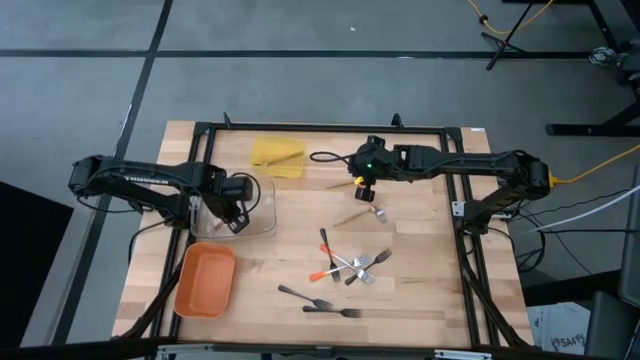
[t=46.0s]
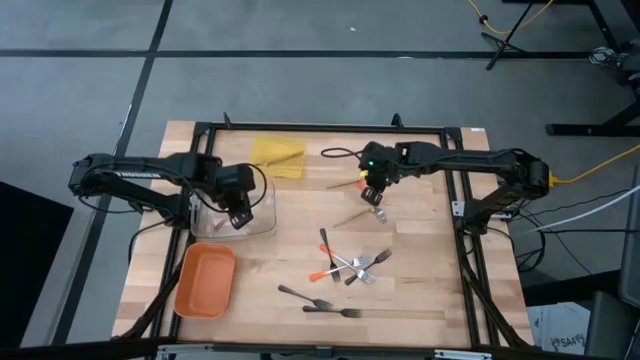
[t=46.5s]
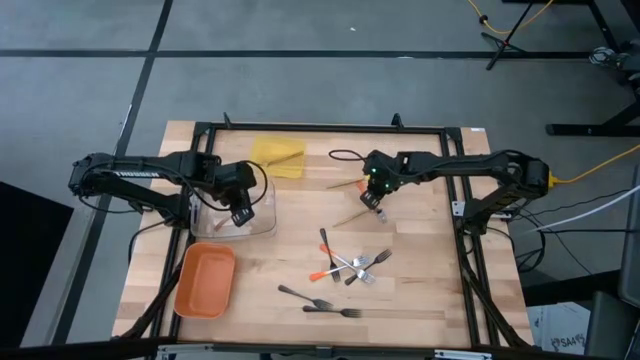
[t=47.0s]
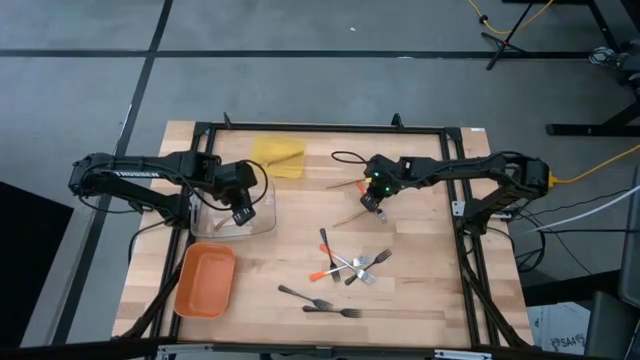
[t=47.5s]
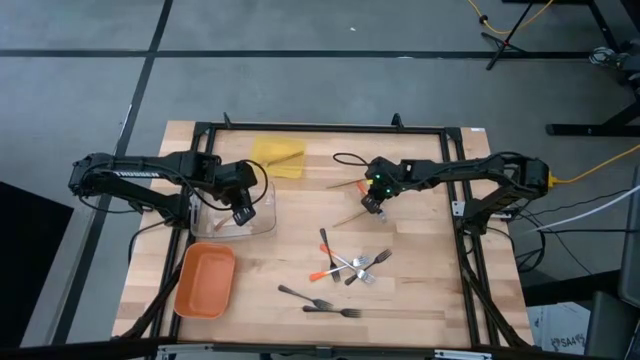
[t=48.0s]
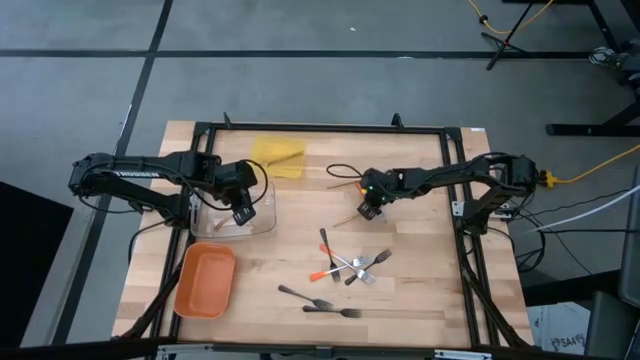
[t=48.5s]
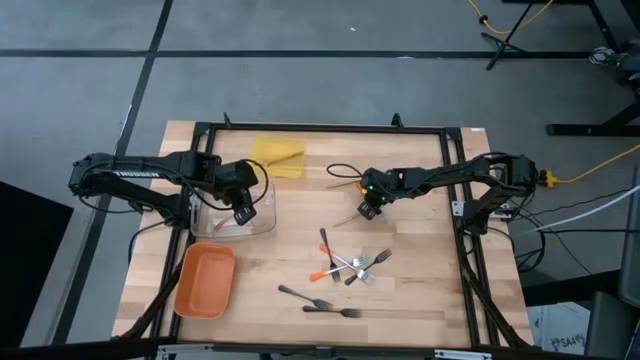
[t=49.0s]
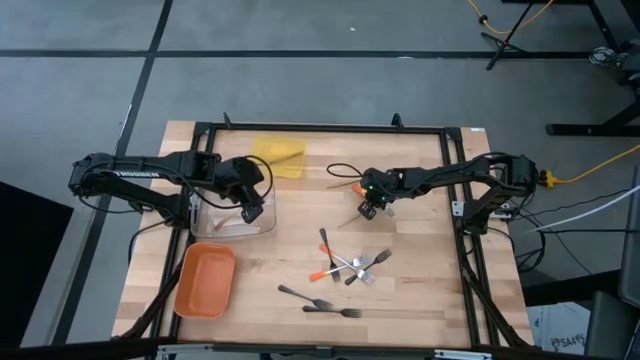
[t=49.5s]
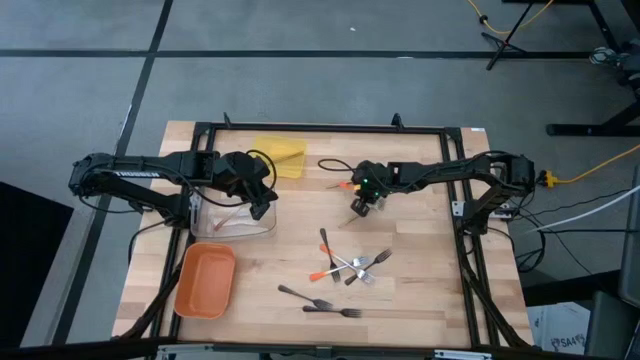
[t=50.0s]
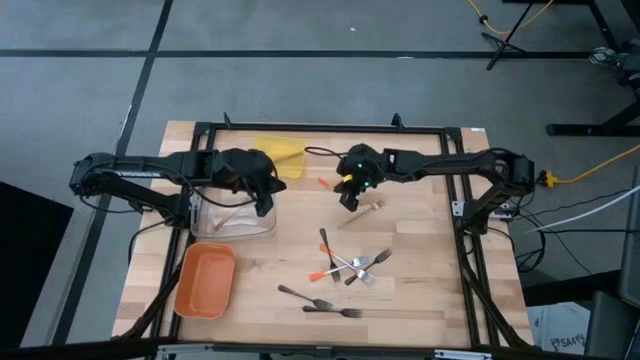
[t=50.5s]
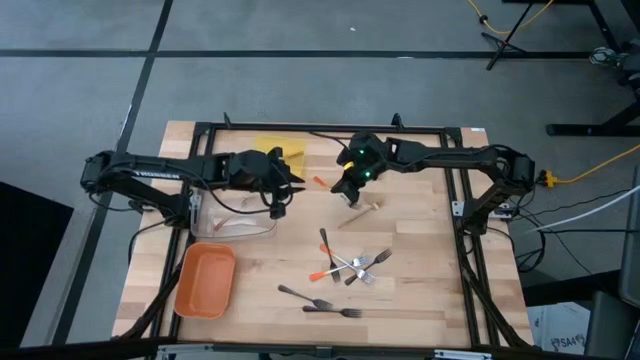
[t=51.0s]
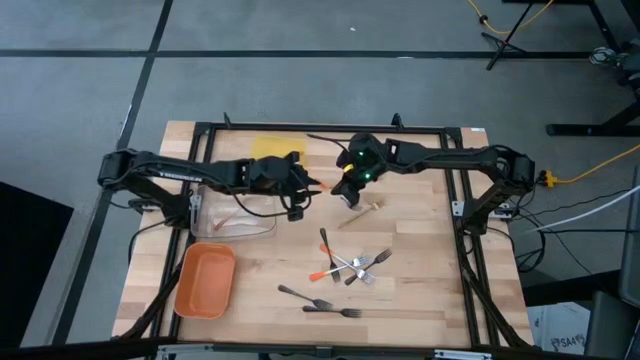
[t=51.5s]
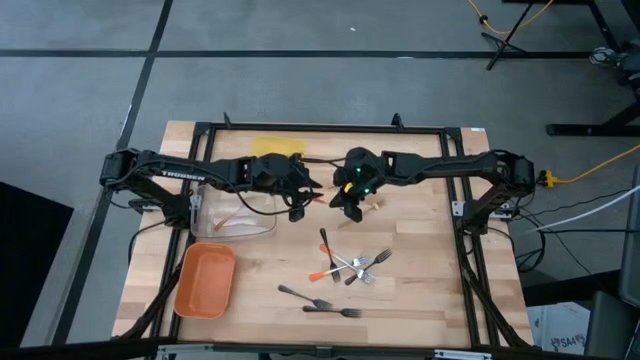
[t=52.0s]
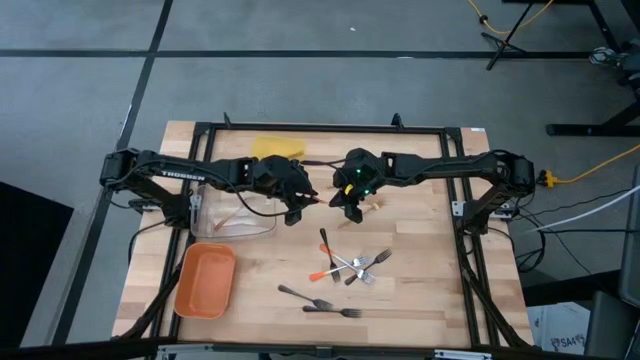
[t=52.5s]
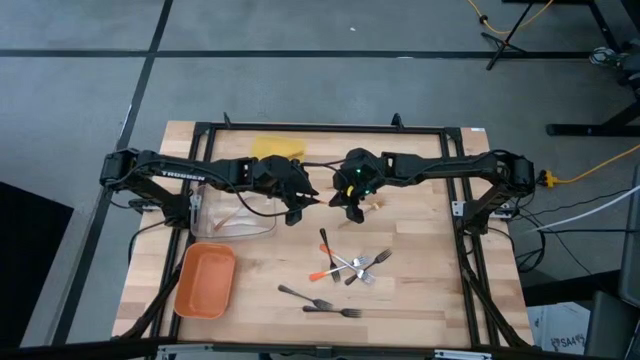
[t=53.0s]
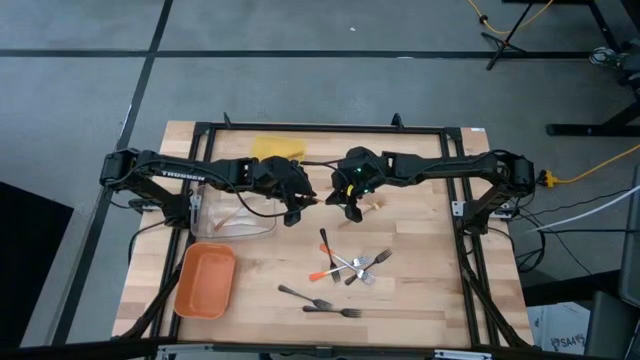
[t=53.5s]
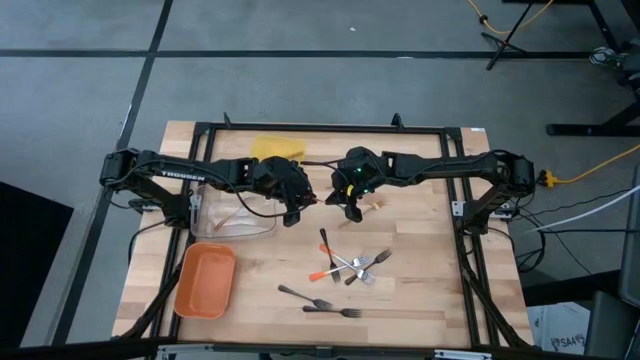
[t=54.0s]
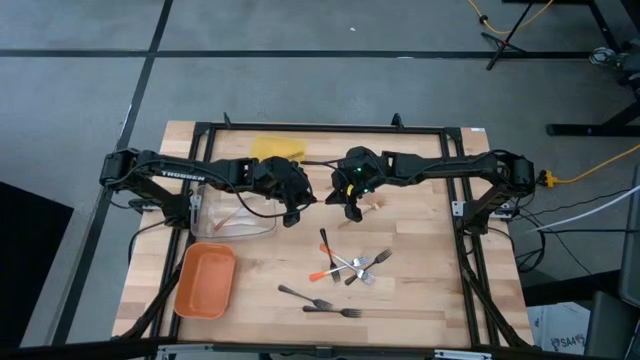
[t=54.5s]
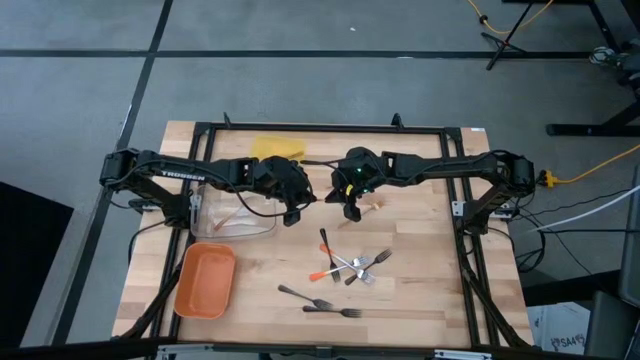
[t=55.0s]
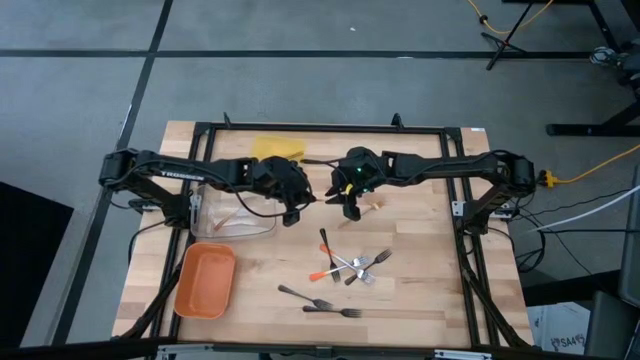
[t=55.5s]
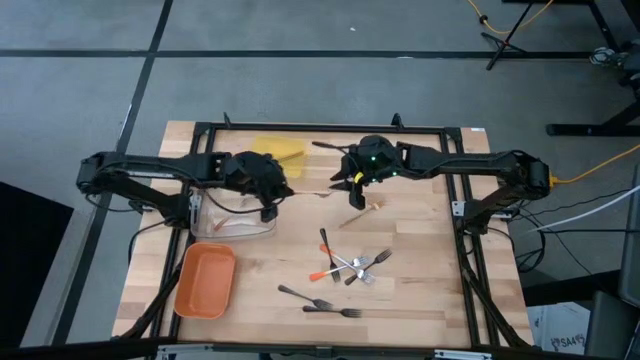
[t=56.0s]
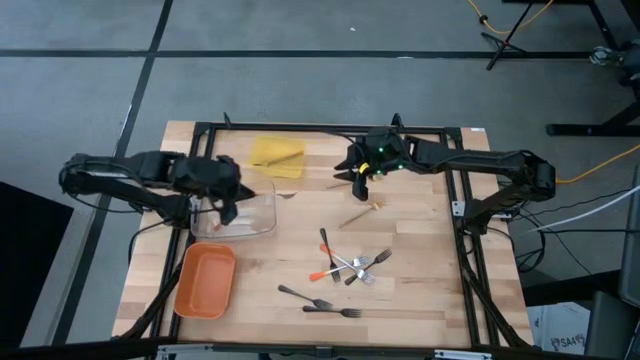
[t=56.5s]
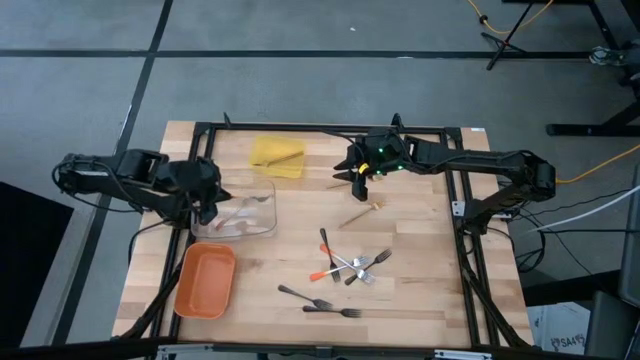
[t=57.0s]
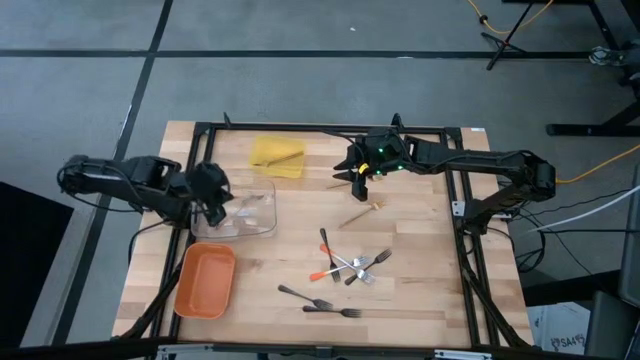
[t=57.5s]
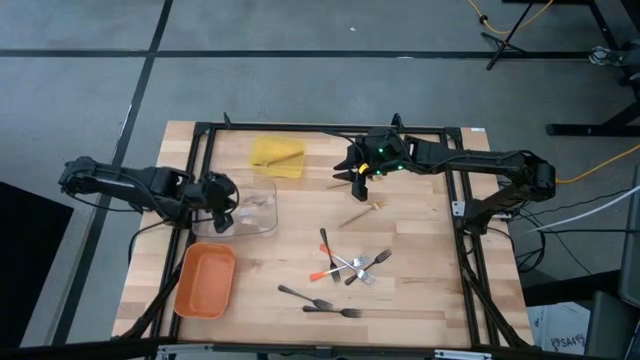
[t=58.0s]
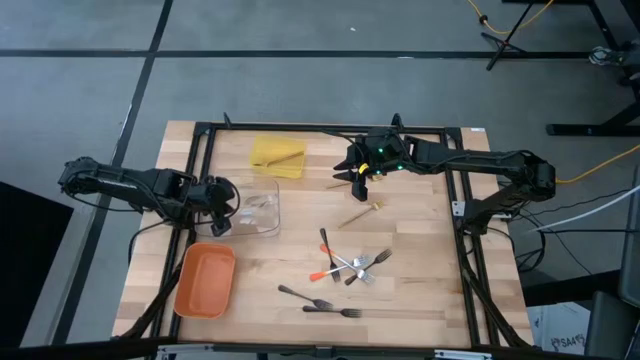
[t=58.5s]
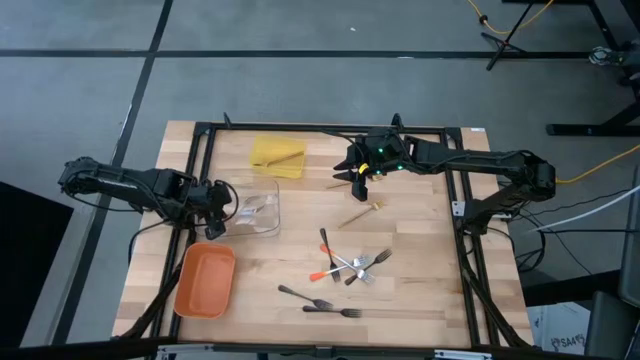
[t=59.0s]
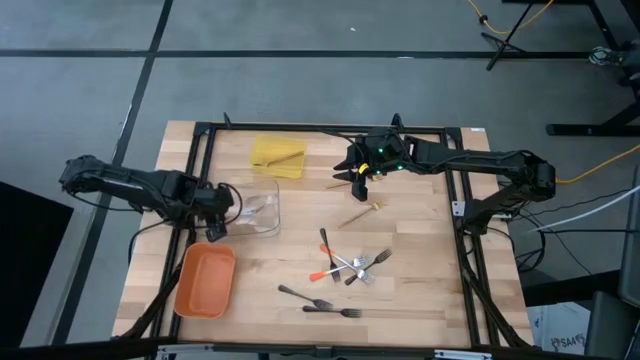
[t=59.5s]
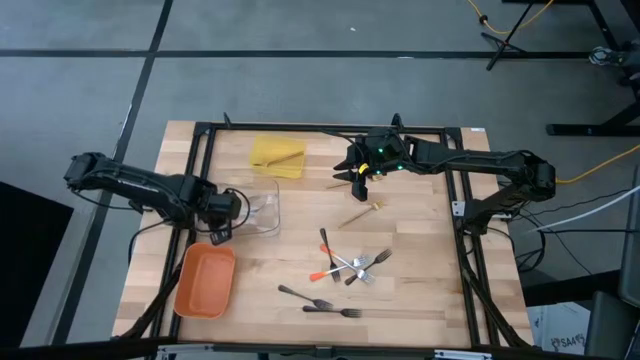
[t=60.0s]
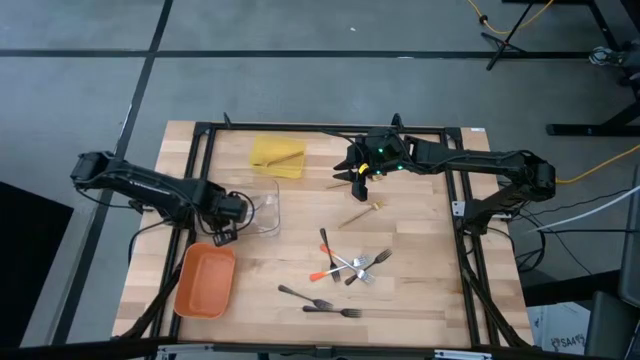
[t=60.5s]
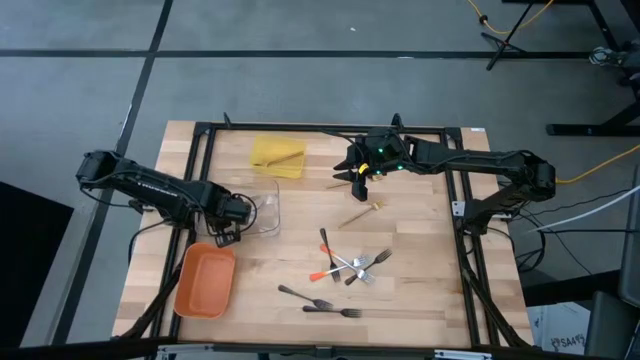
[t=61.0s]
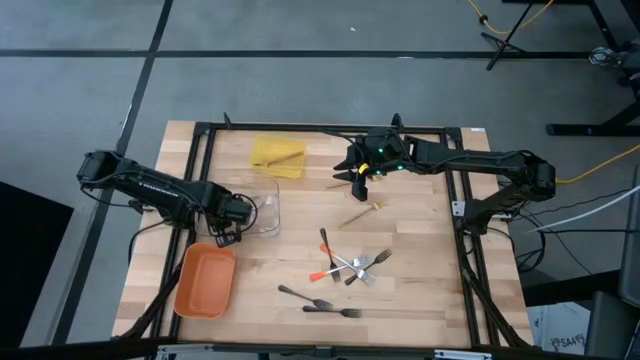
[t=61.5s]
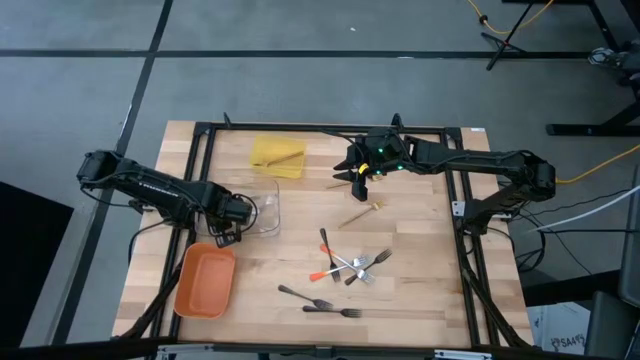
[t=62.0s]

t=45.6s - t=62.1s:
Task: Sort silverware by color (type)
Put the orange fork into the transparent bin

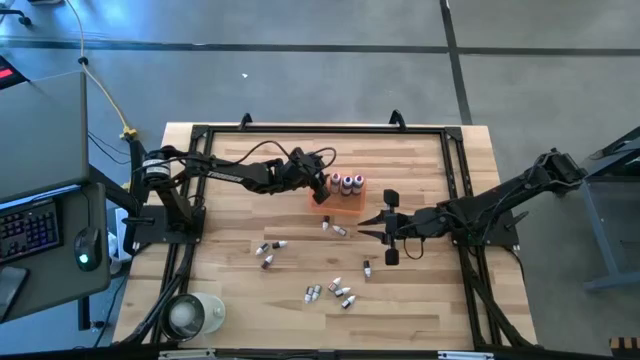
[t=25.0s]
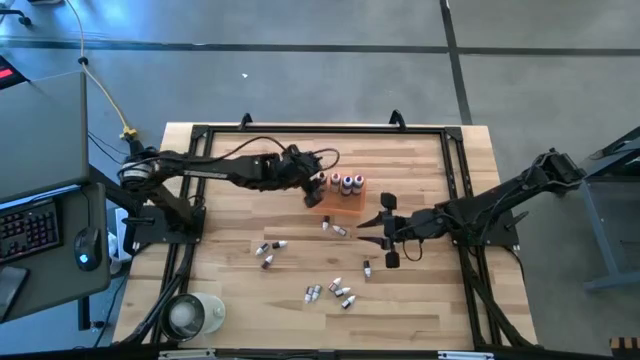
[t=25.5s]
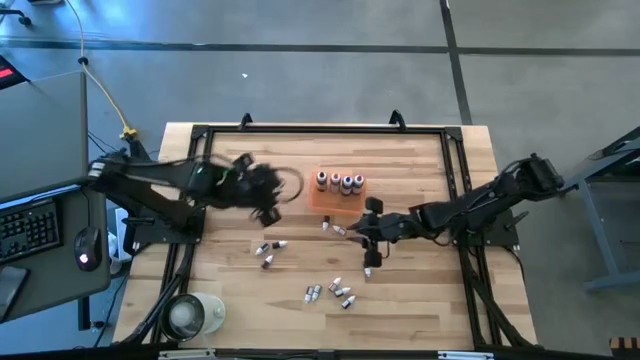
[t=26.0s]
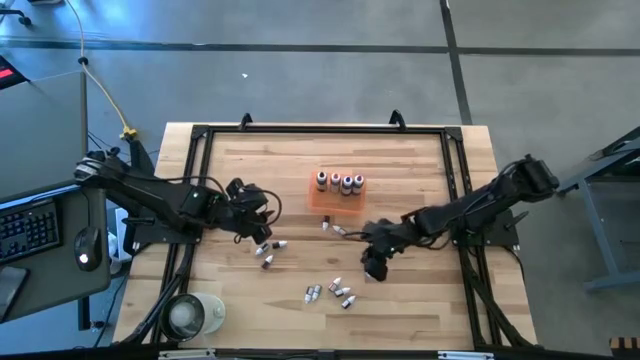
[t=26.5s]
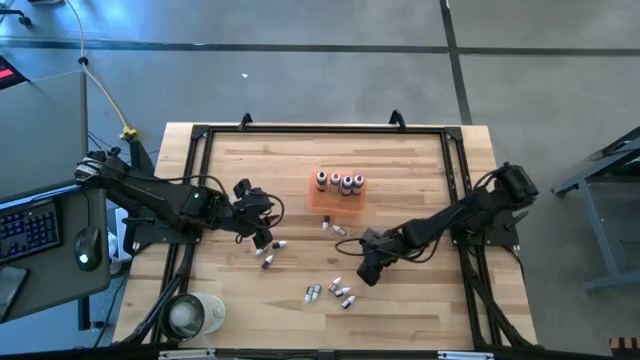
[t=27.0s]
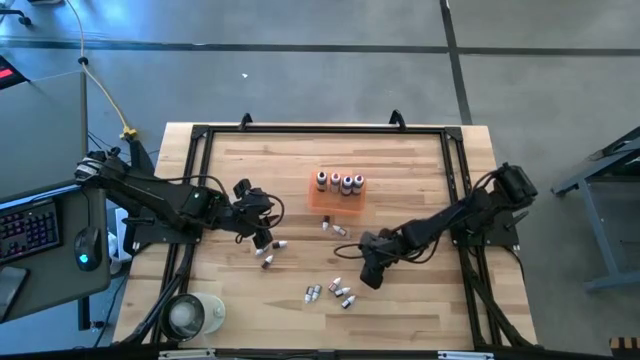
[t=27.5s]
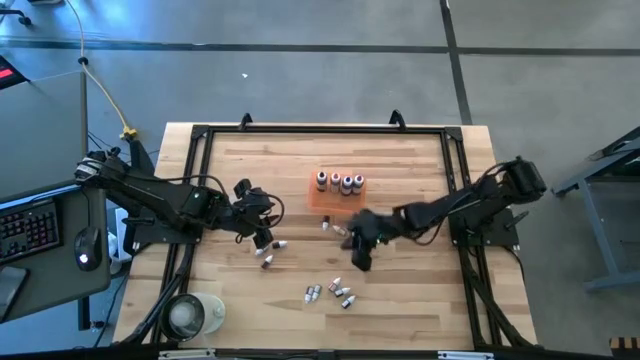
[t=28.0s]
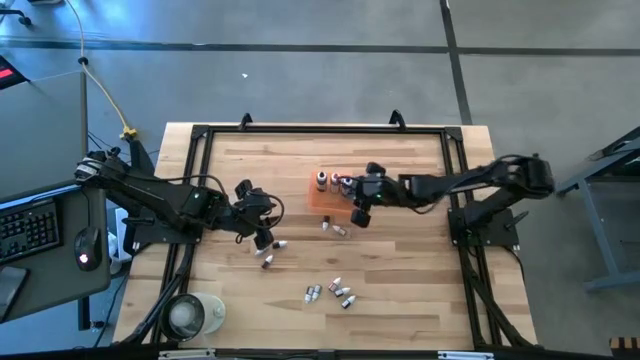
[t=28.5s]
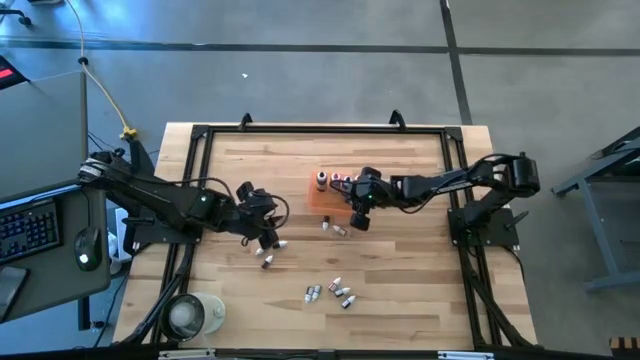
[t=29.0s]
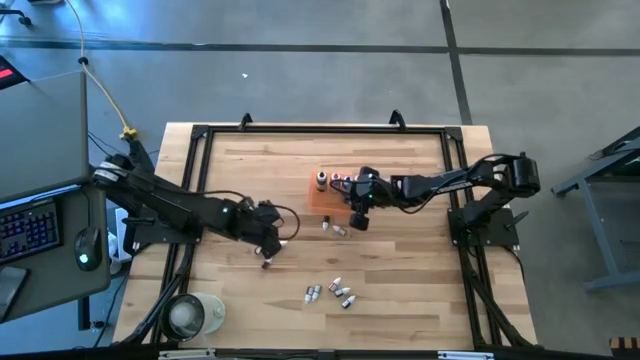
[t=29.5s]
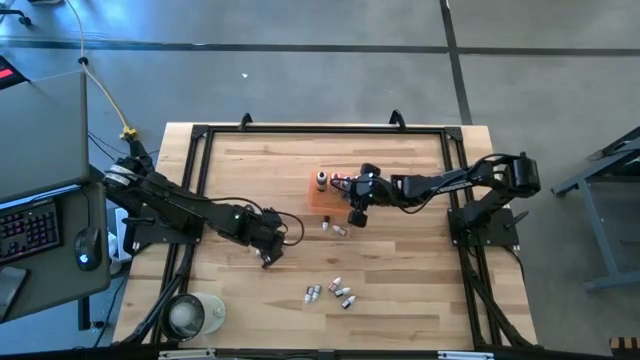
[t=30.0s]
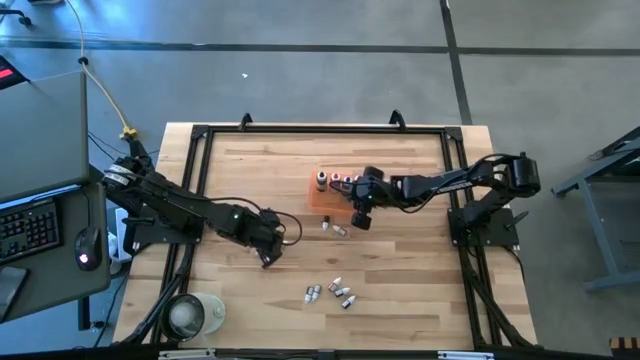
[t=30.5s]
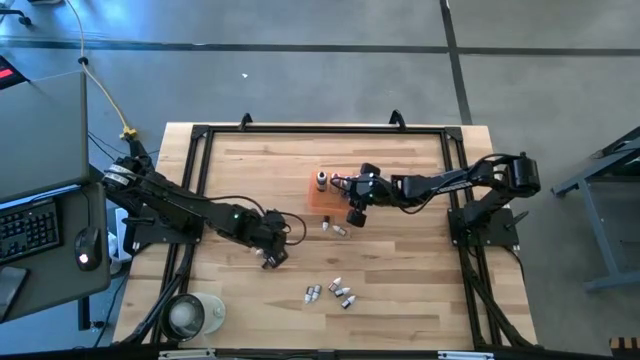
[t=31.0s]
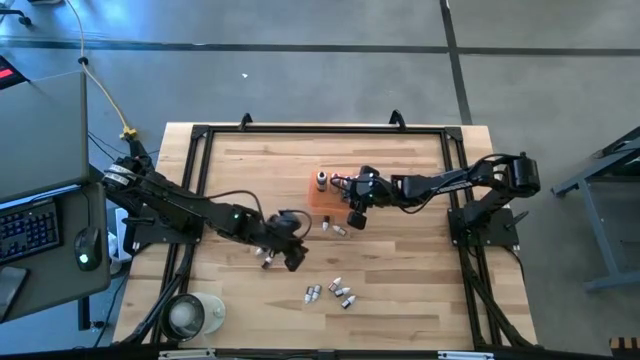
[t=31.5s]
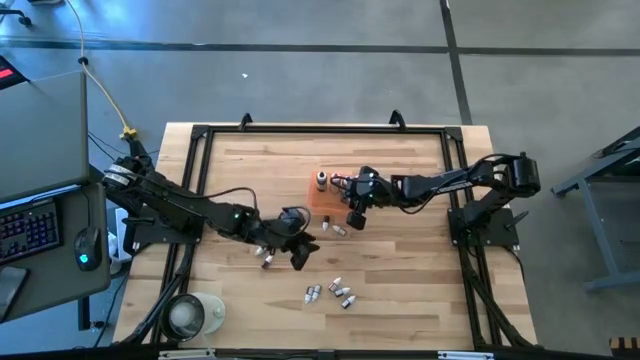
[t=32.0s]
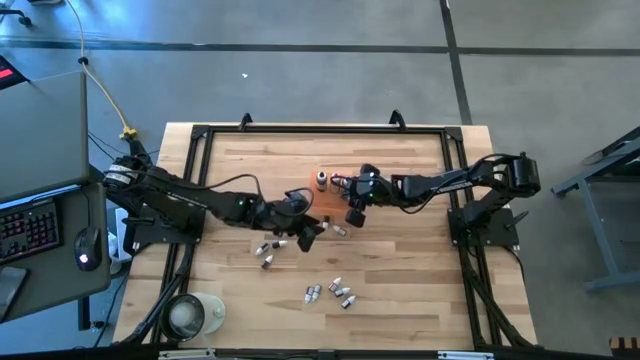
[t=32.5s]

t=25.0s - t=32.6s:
Task: Pick & Place food coloring
Put the top small purple food coloring bottle into the orange bin
